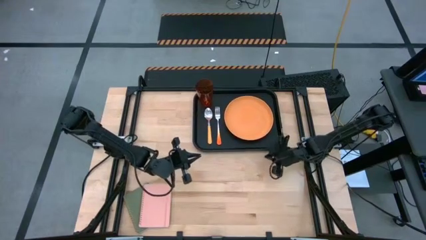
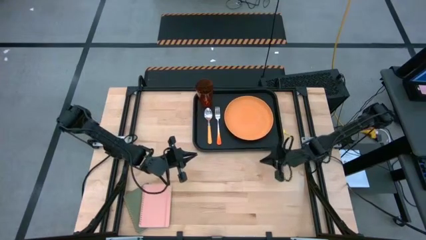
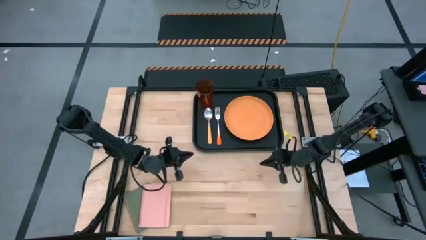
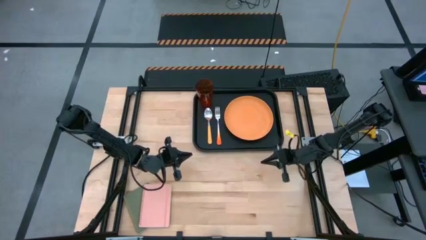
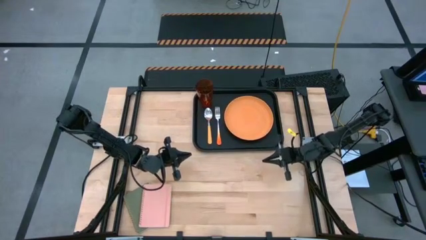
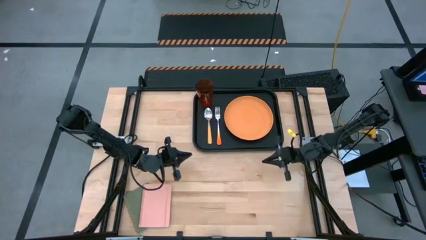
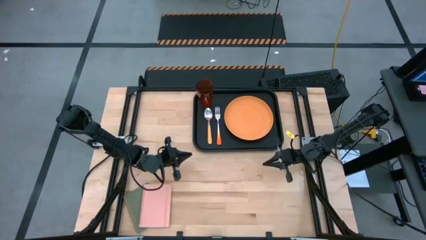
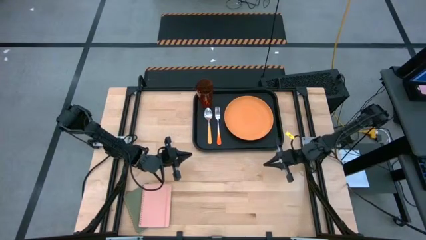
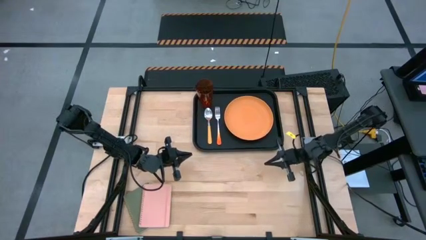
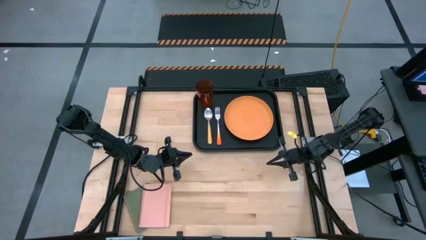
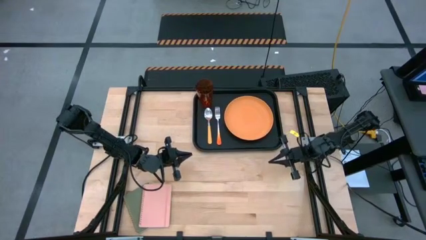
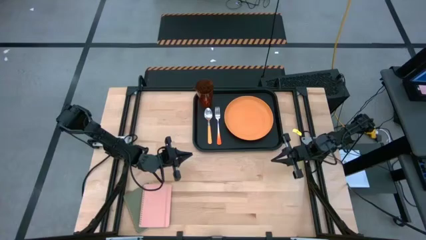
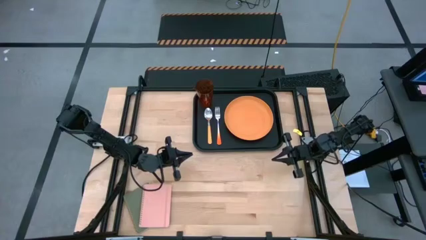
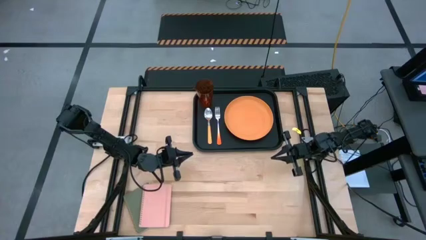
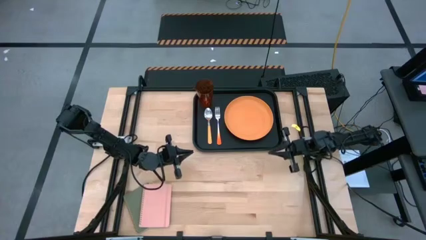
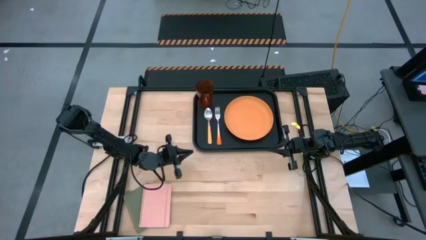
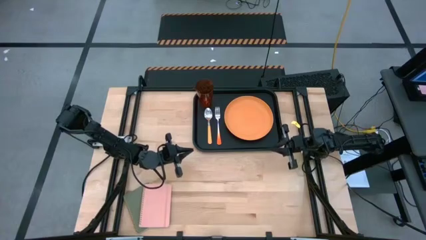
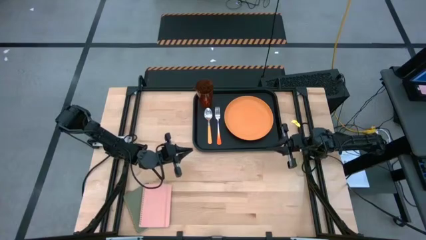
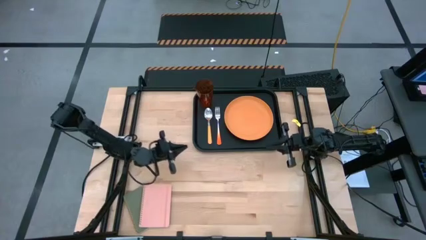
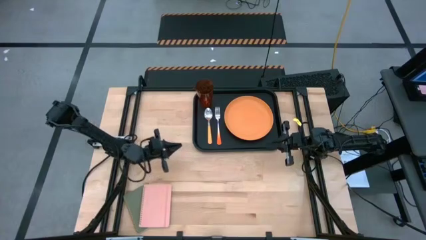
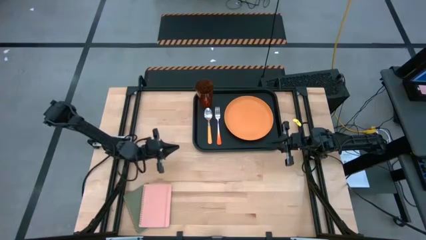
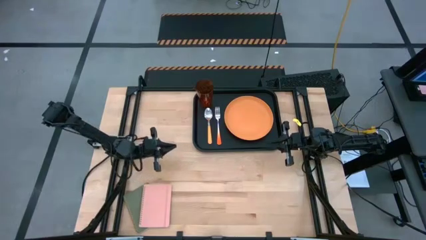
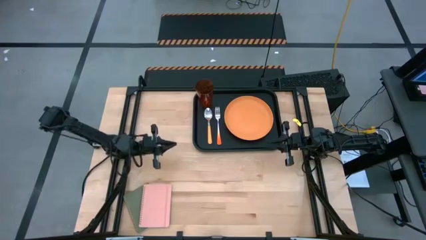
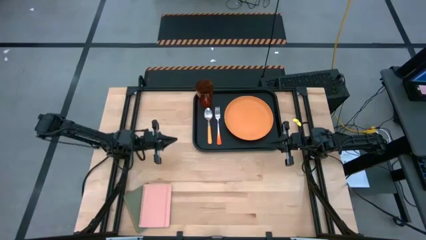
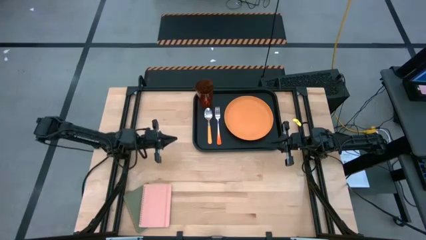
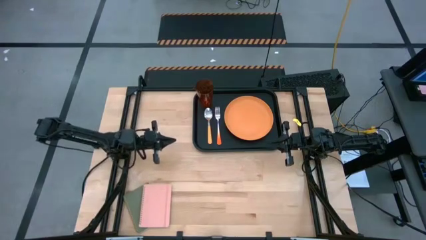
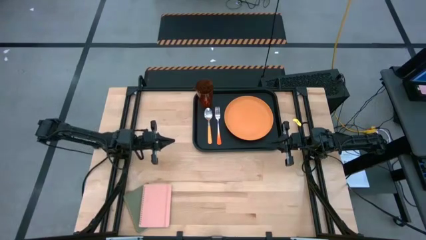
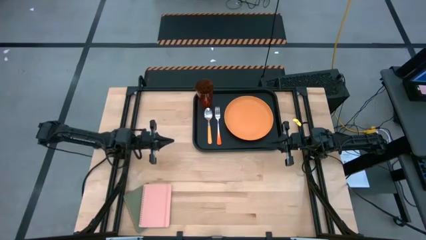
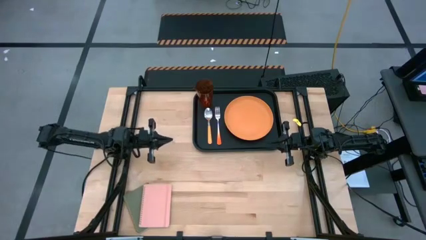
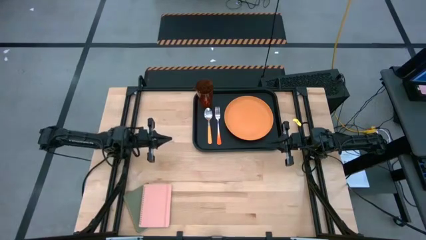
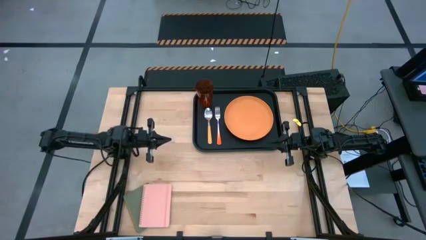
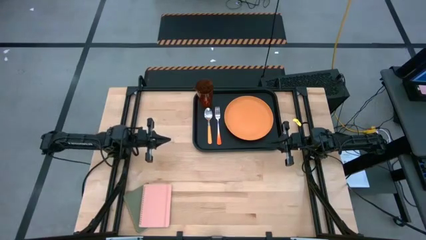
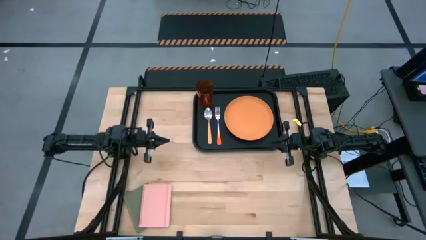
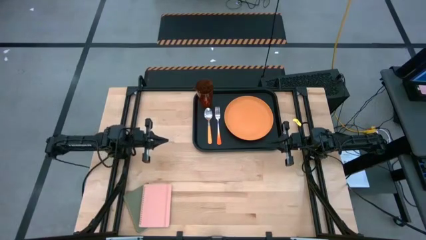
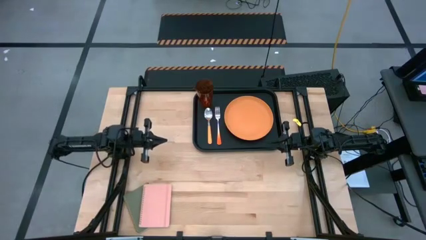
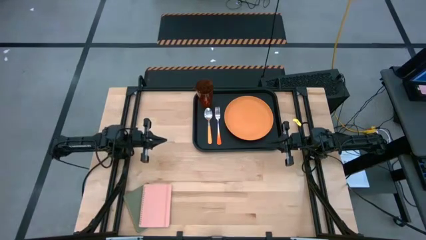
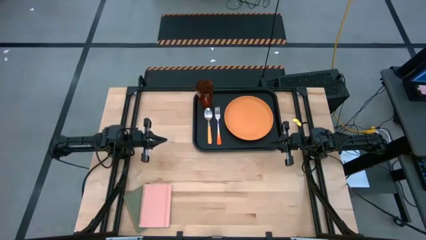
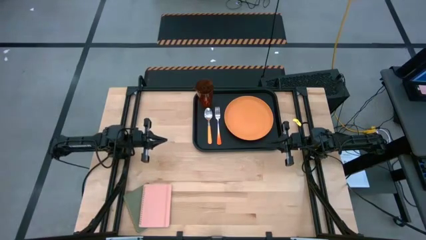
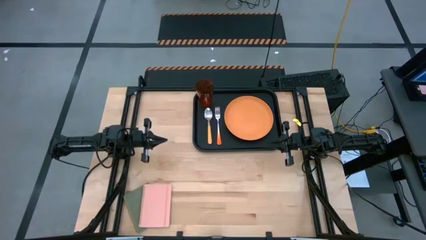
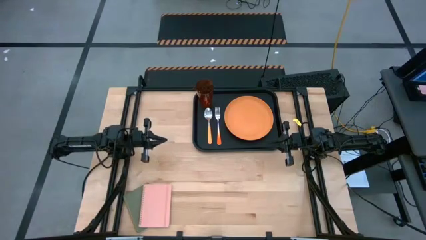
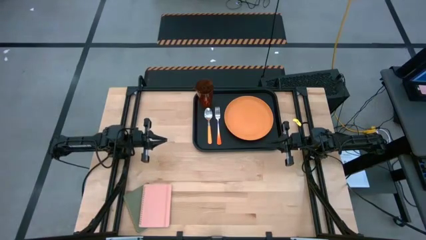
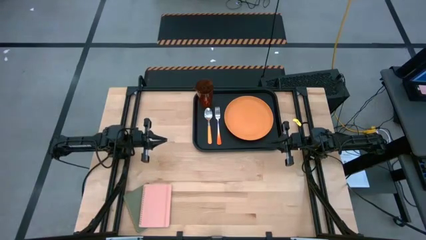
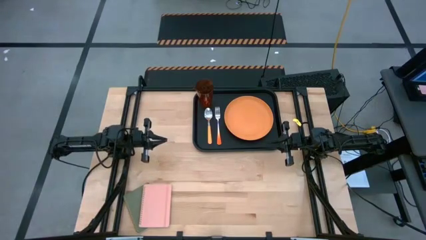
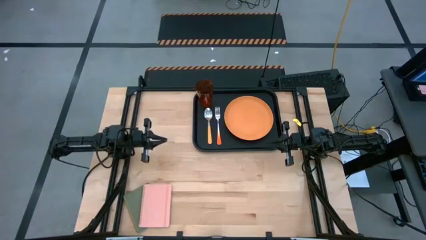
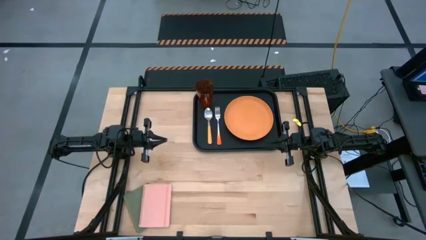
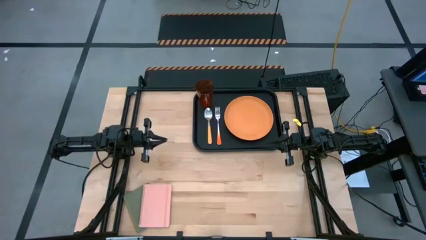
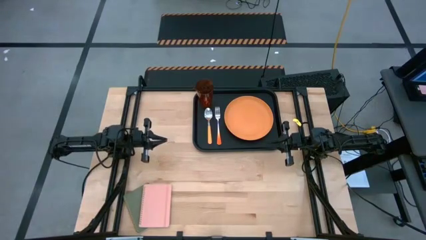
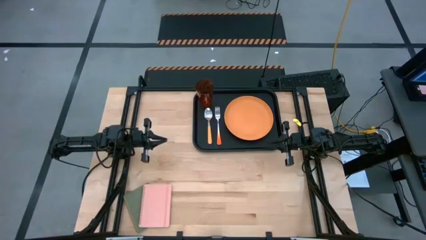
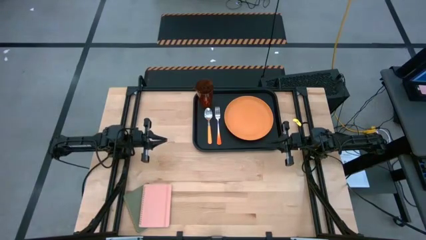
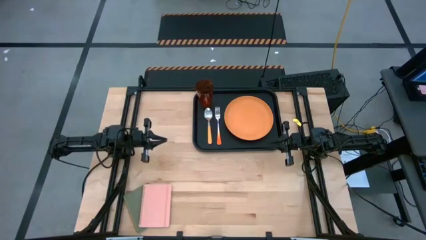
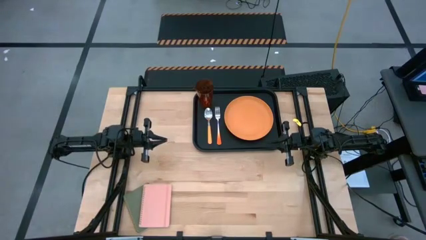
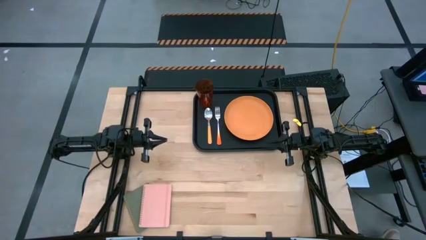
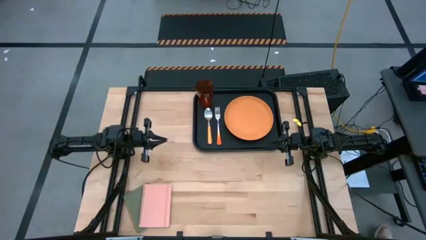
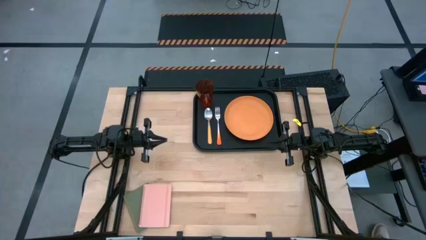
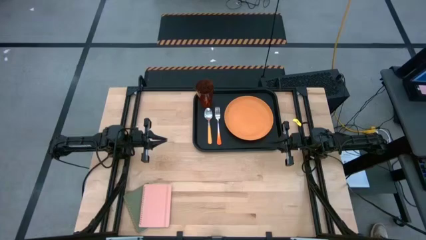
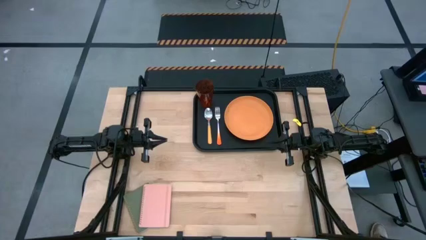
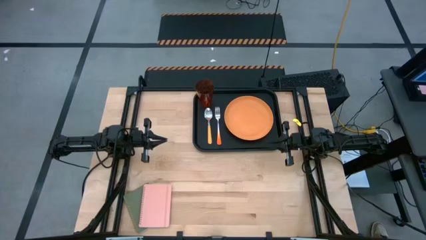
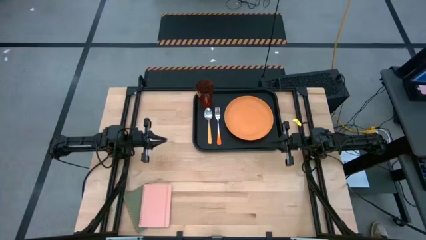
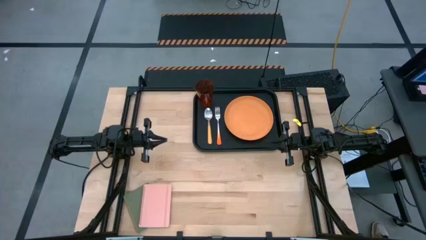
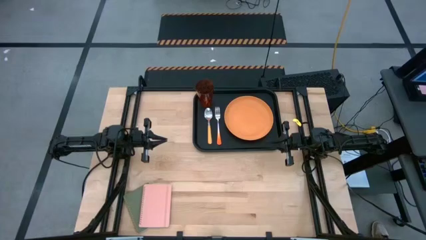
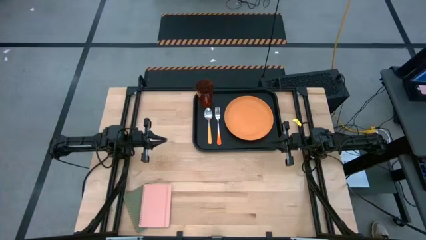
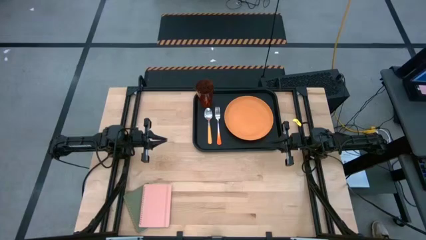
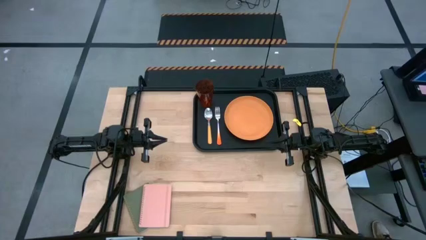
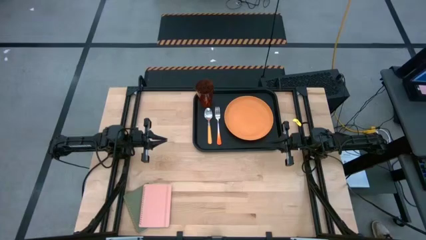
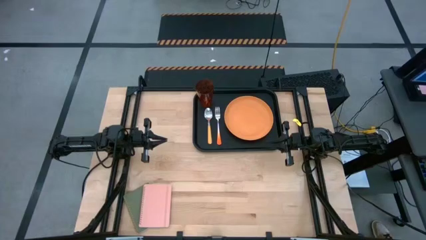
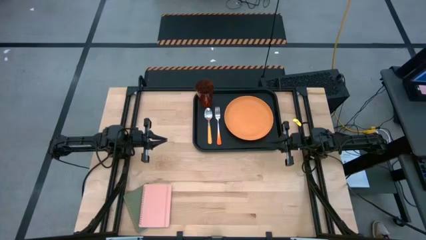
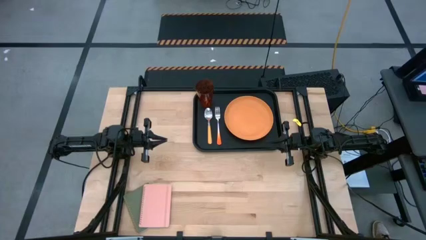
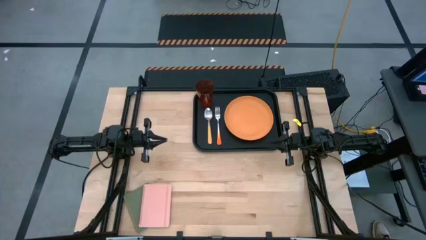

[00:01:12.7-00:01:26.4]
Task: Pick and place plate/cup/fork/spoon on tray
Return to Home Position
